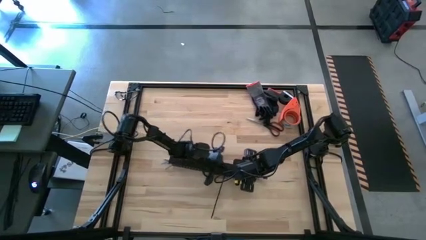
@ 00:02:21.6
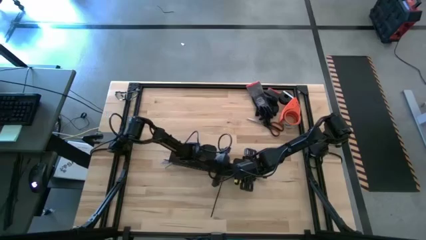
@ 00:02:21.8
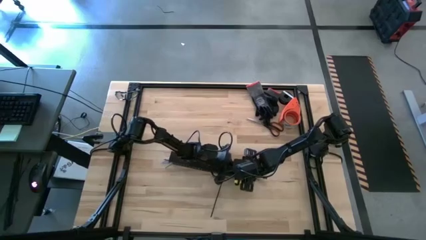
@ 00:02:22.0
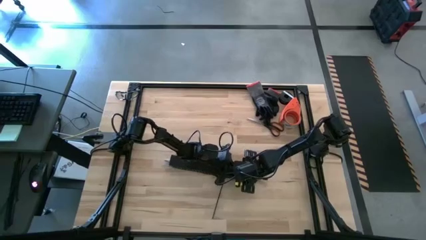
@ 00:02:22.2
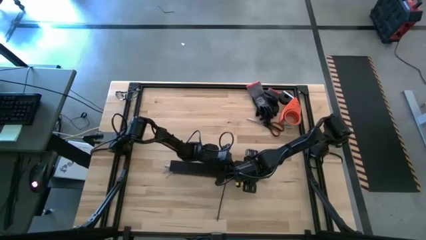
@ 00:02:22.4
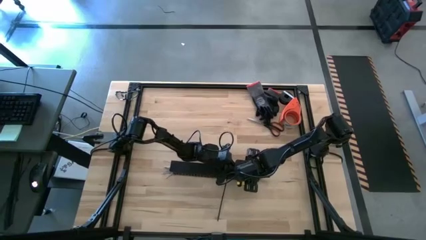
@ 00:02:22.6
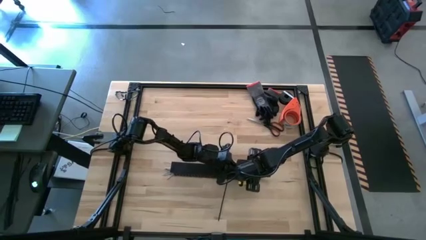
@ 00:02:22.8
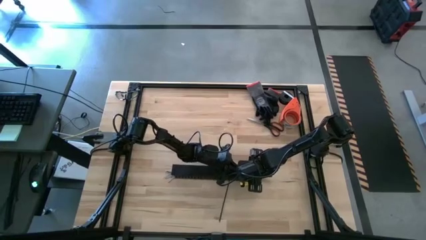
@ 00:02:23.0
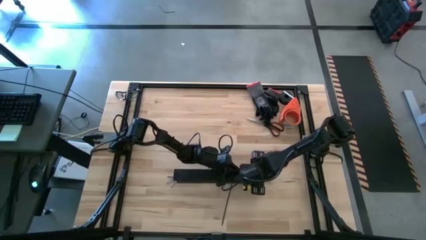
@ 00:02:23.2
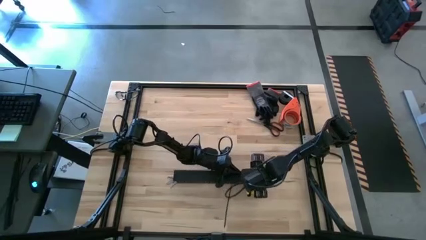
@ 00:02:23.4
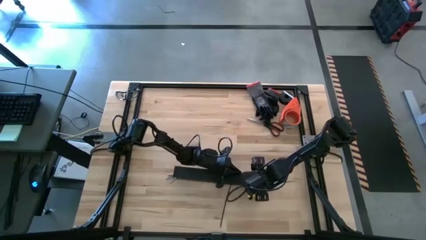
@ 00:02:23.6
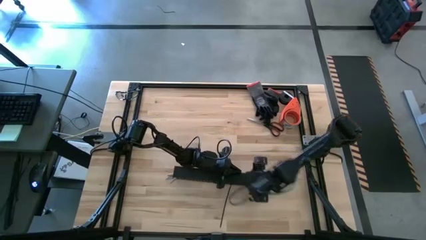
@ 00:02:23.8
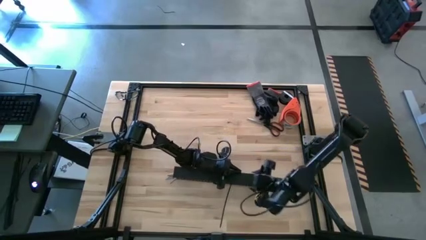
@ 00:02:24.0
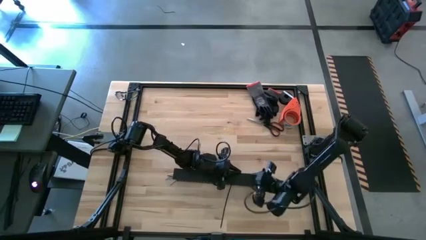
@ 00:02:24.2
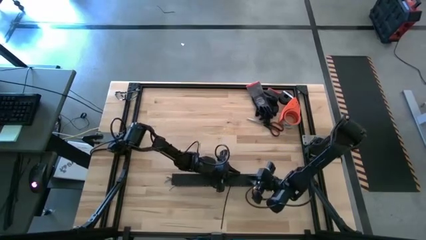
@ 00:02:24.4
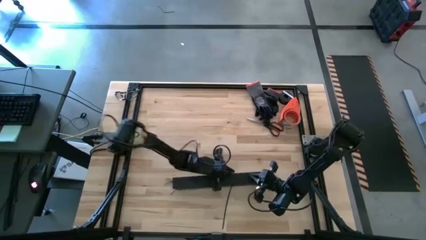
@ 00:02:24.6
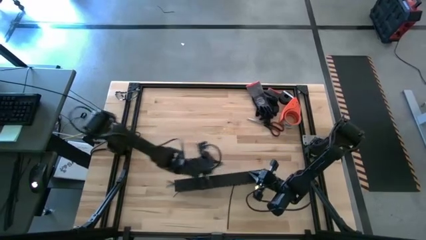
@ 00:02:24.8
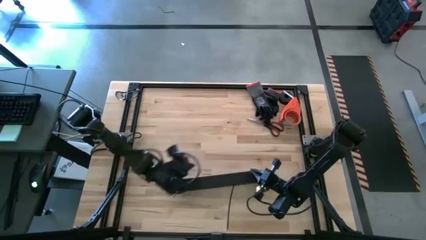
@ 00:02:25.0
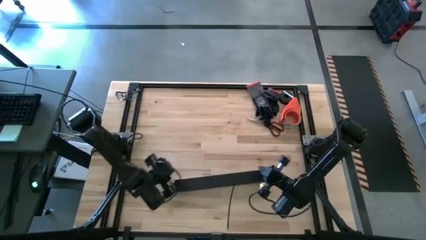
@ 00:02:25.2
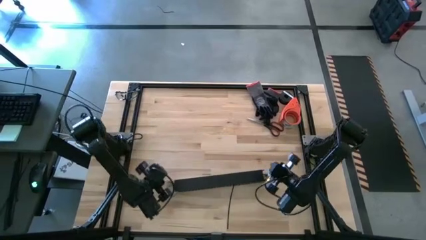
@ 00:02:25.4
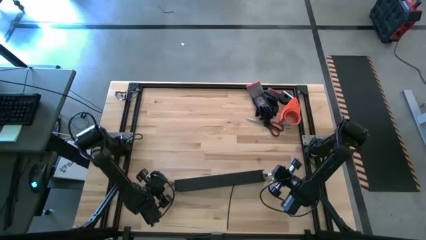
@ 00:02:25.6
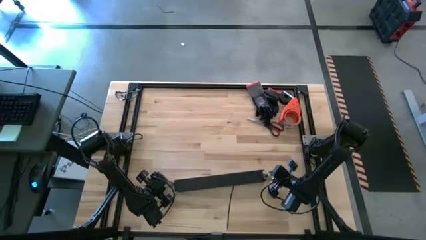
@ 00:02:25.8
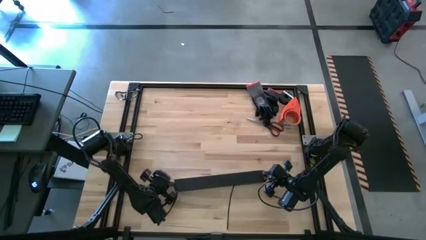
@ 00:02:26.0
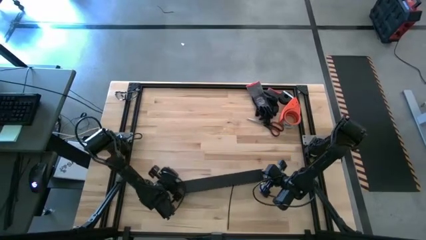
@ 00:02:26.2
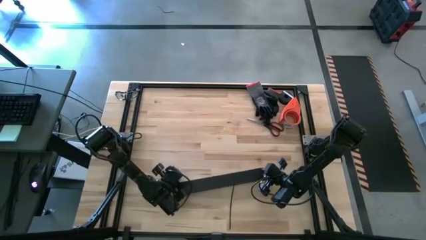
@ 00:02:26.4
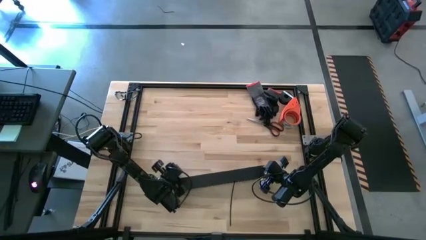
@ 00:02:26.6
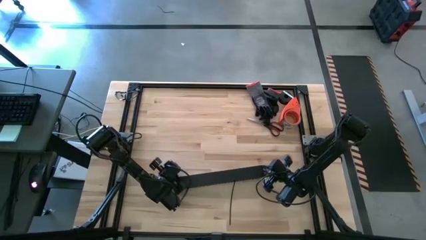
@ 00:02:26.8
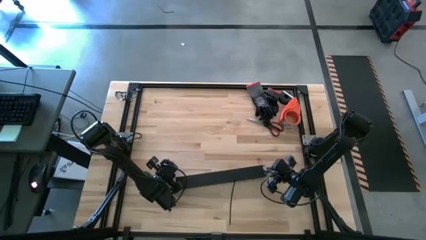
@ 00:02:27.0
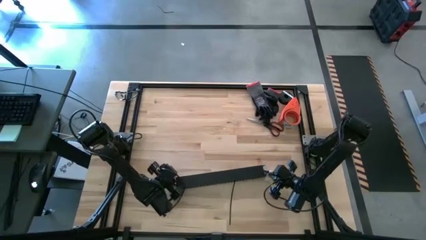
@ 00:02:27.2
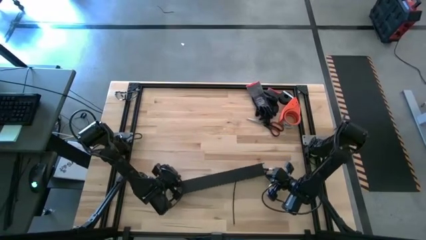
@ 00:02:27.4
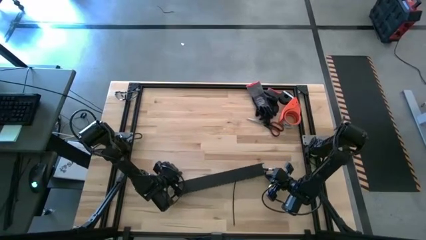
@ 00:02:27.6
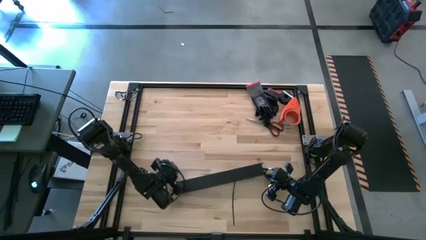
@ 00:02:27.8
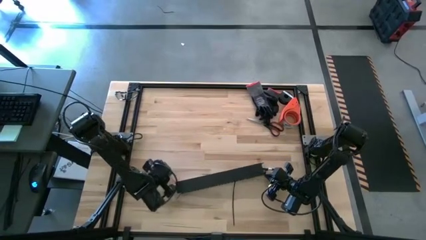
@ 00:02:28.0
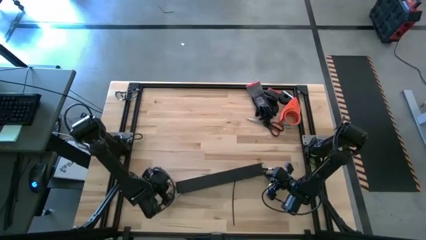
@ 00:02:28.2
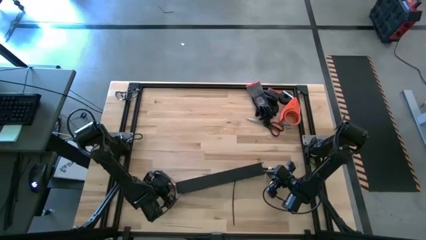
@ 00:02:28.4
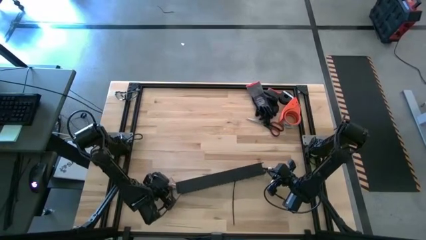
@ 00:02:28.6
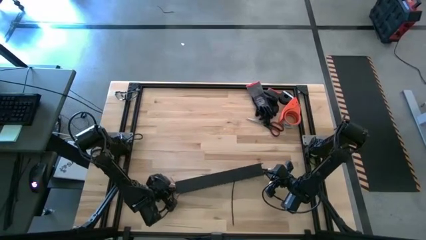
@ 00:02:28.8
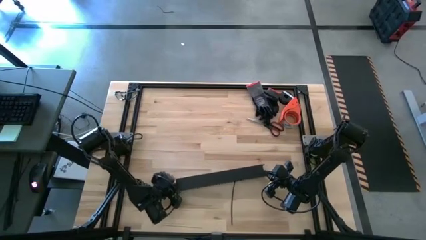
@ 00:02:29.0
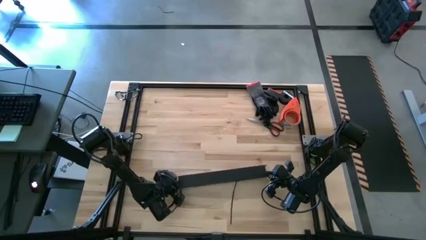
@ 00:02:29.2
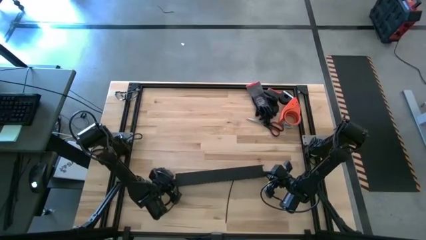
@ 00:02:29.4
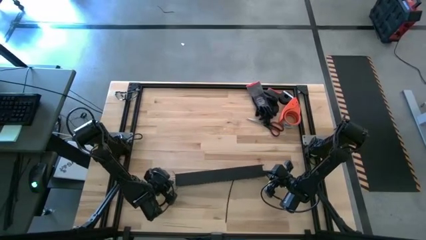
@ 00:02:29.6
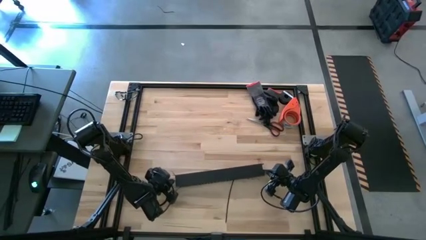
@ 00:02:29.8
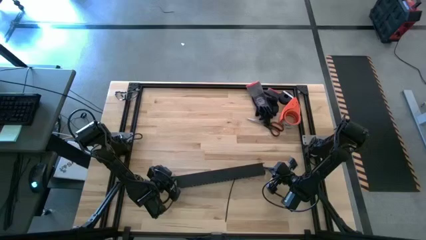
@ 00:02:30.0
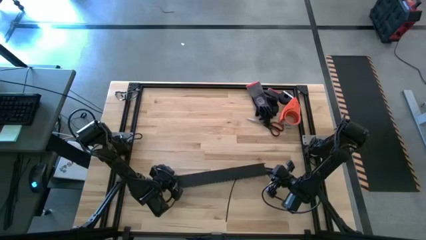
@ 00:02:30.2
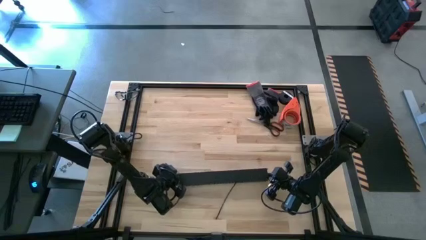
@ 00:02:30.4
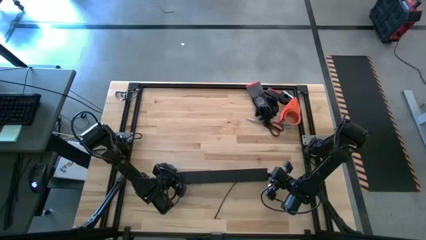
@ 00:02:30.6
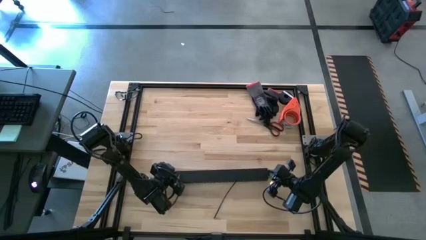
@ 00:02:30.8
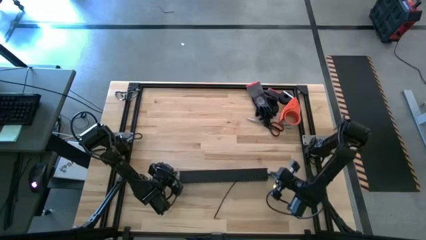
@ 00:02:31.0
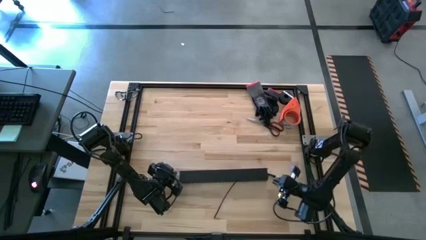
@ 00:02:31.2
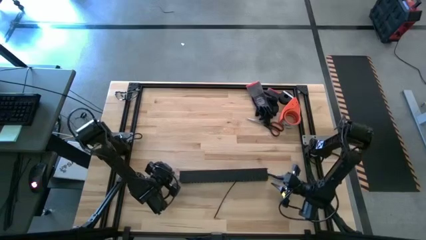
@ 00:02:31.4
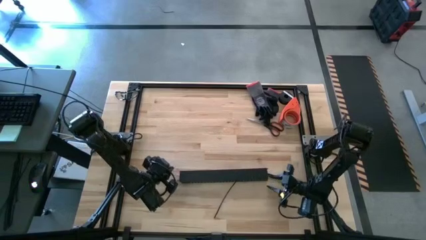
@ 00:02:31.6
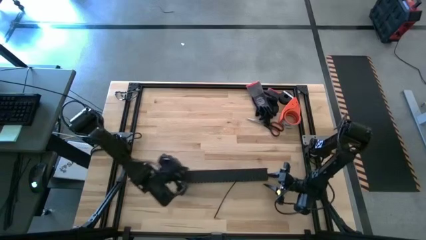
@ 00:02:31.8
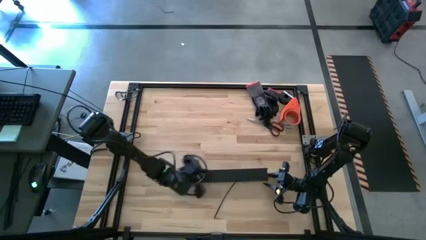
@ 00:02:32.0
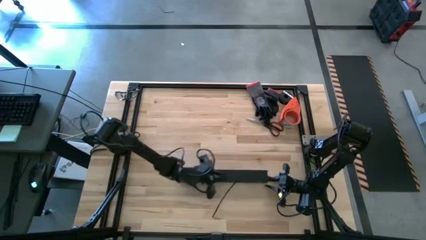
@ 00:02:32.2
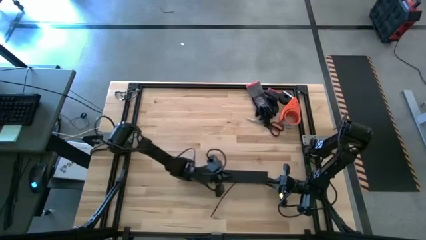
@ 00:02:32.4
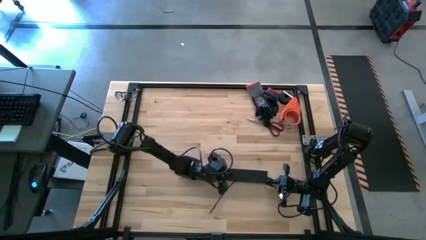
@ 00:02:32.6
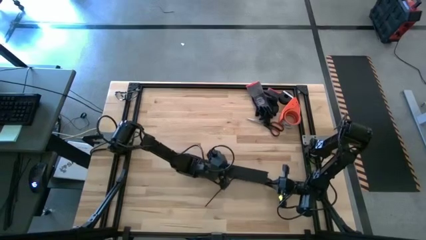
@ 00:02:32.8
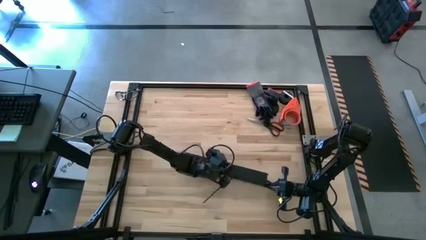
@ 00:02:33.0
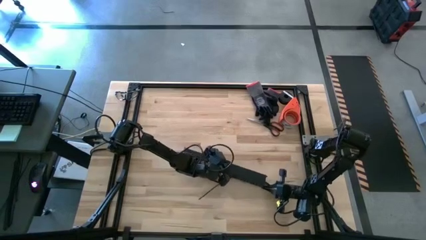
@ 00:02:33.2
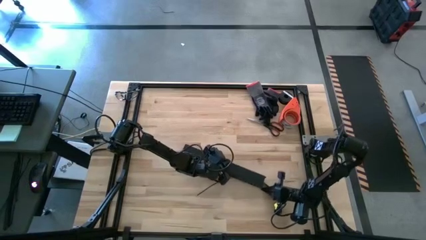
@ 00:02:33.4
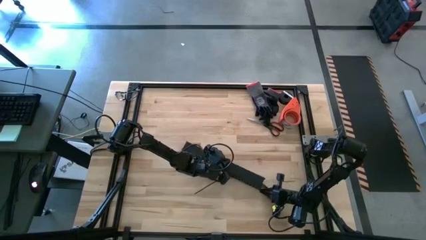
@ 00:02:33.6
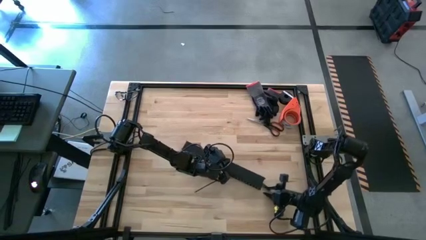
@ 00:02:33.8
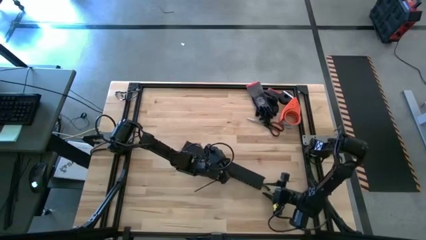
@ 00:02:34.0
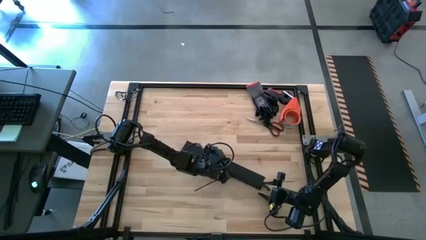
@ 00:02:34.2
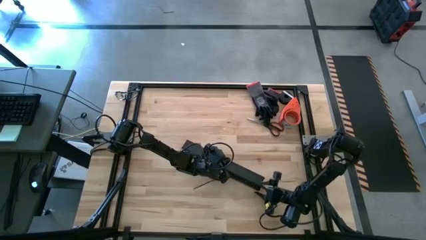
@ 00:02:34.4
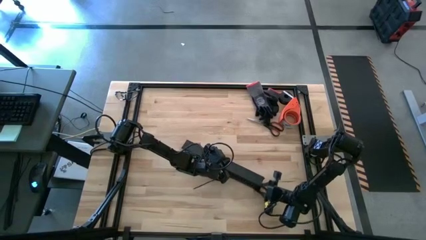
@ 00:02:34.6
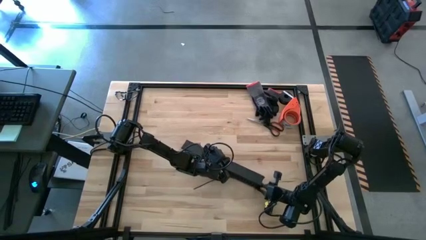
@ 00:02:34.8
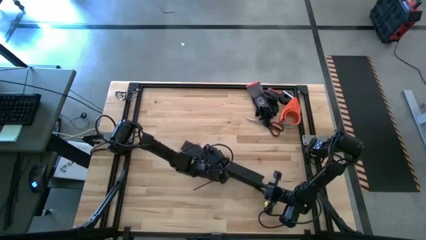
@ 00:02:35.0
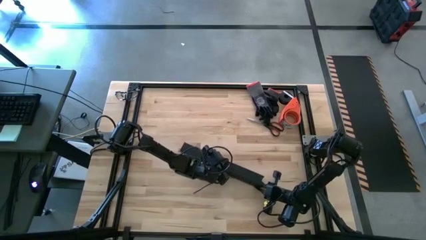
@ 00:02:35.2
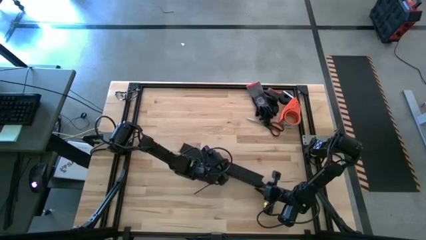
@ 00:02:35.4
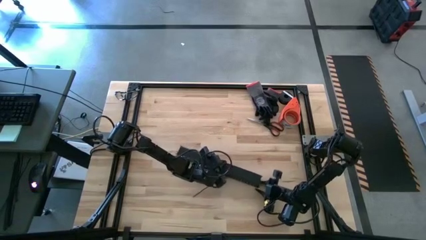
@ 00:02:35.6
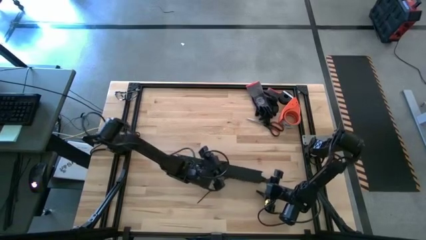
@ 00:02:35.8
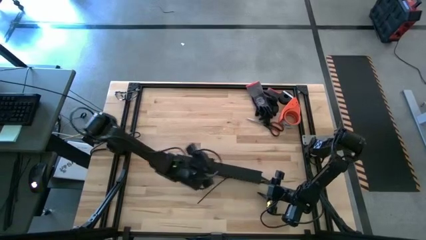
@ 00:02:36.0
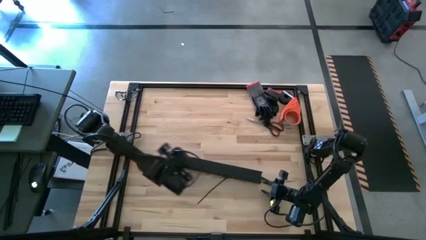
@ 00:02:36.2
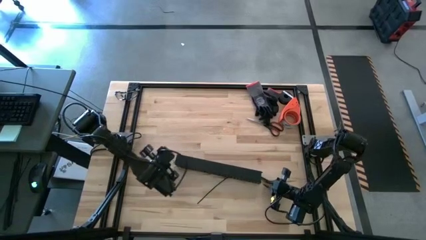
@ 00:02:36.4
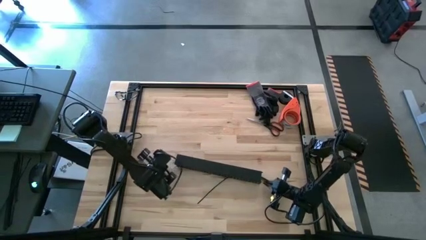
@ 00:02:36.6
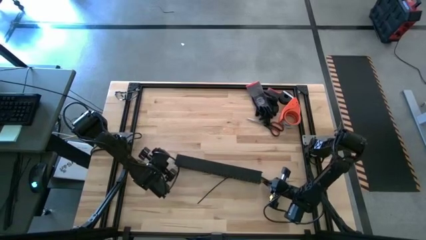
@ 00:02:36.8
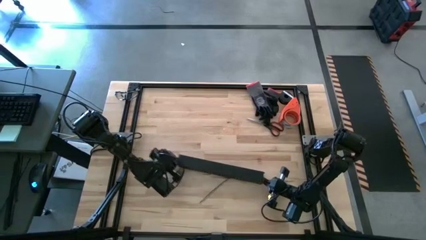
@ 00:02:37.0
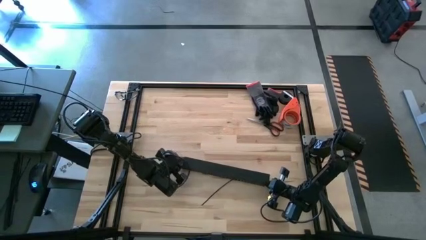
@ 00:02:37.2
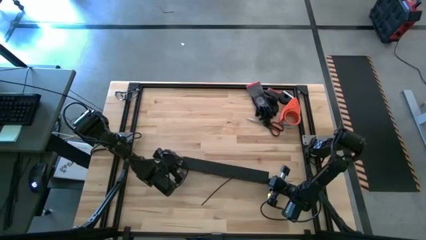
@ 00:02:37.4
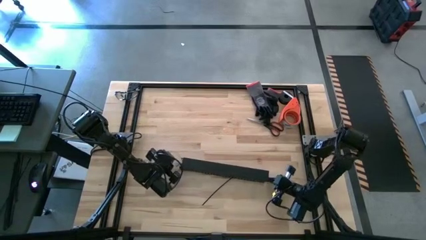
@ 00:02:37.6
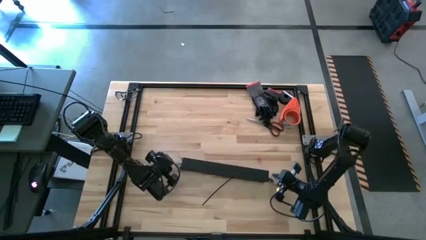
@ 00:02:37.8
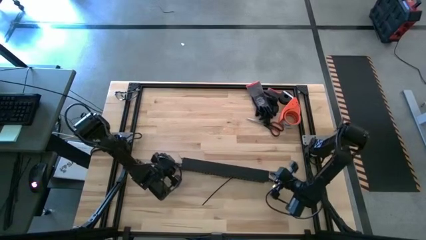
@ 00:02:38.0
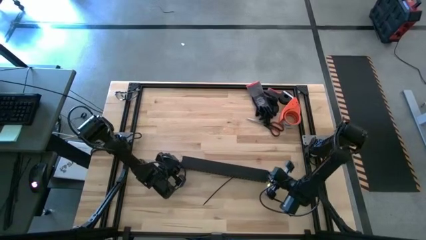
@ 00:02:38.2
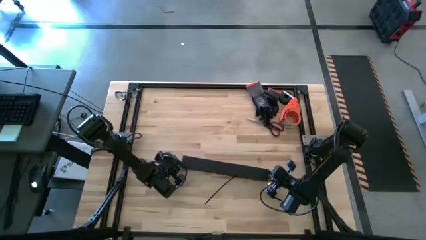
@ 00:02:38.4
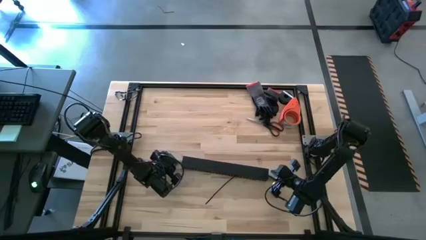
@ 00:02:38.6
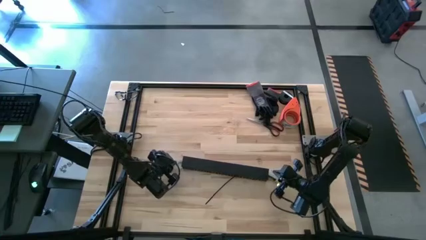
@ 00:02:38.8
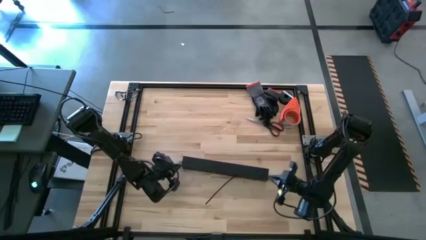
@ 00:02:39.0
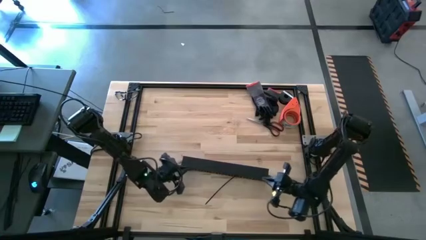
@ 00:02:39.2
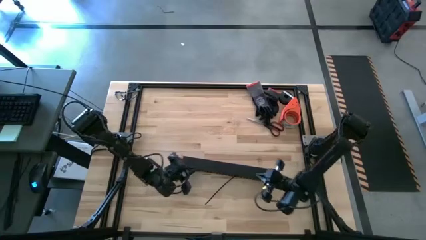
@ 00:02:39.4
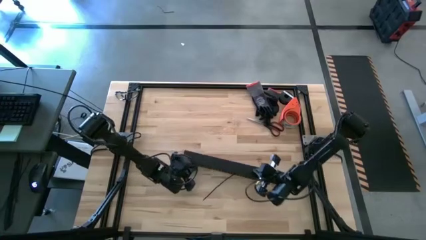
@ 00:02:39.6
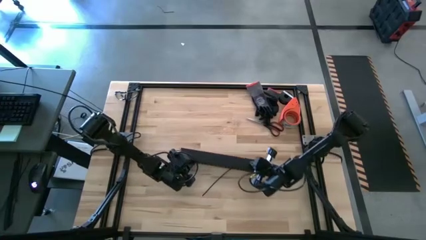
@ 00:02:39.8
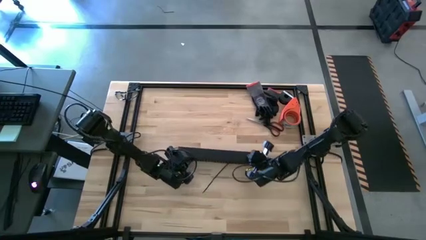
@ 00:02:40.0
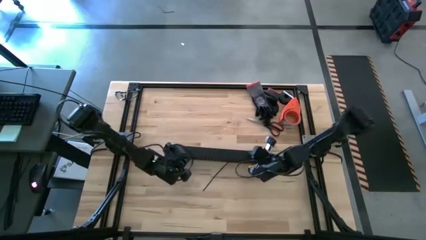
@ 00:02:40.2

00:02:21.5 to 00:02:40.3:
Task: Ziptie cables
Close the black cable duct
